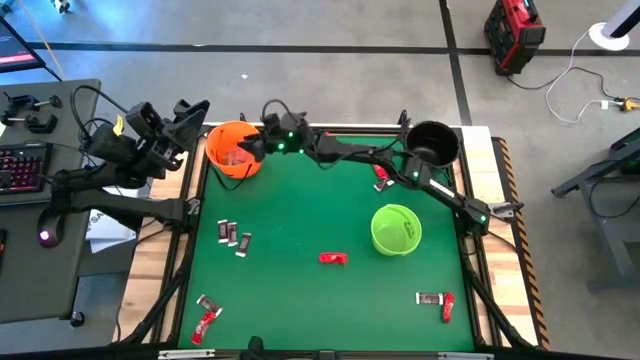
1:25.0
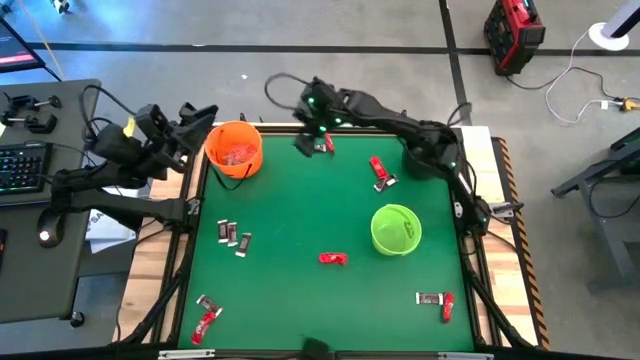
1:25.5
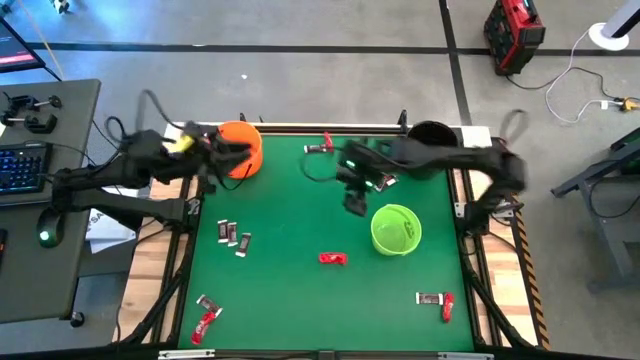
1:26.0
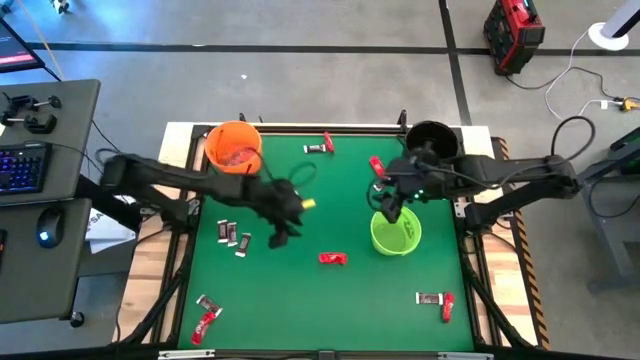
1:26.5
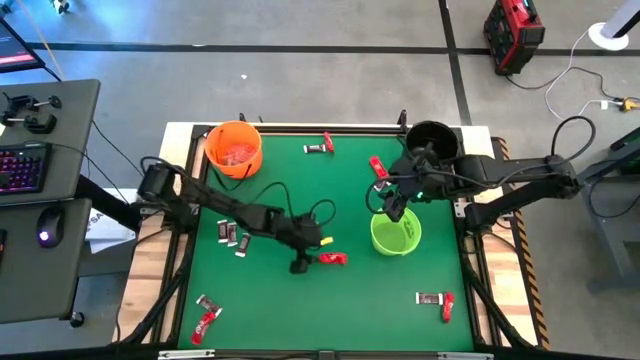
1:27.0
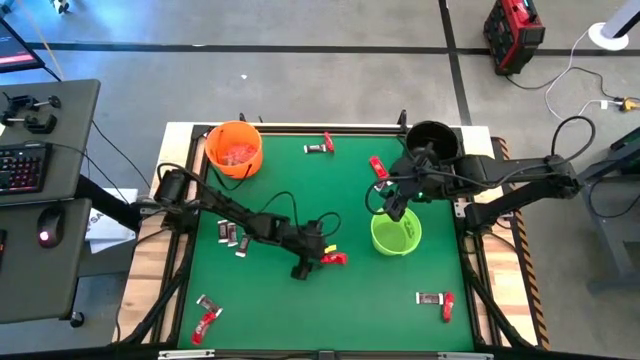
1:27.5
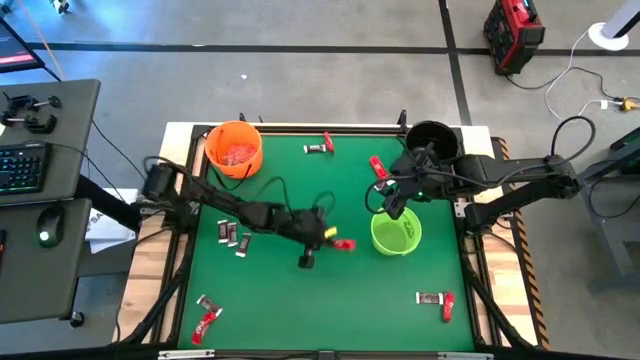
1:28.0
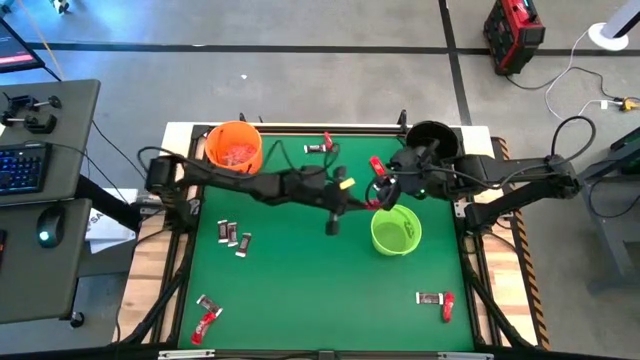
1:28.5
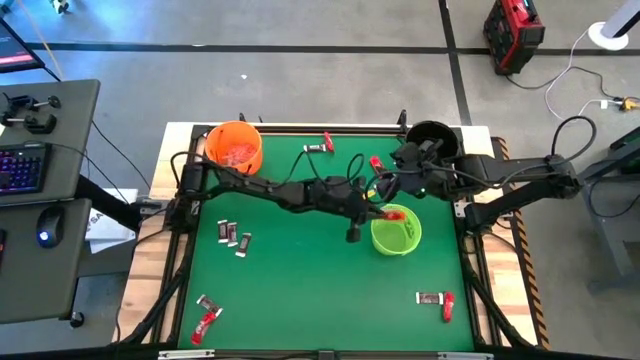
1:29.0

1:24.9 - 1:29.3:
Task: Sort candy by brand, put in halloween buckets
Put the red chocolate bar into the green bucket

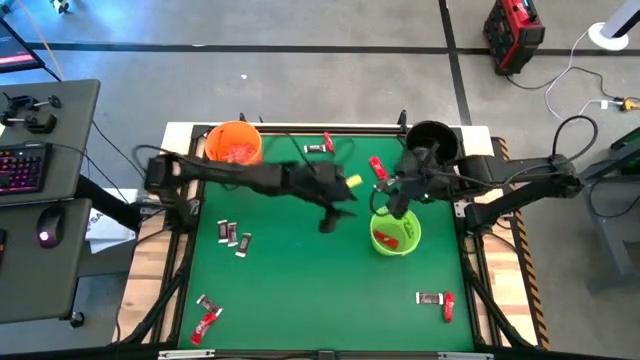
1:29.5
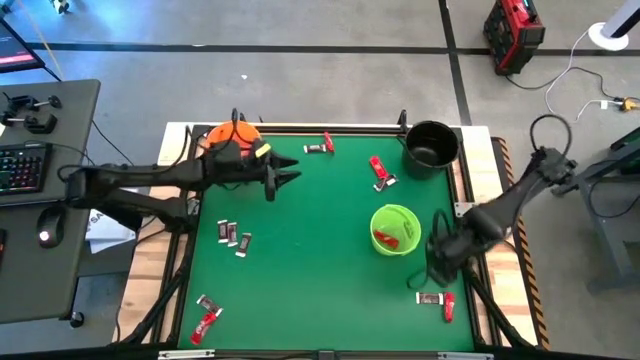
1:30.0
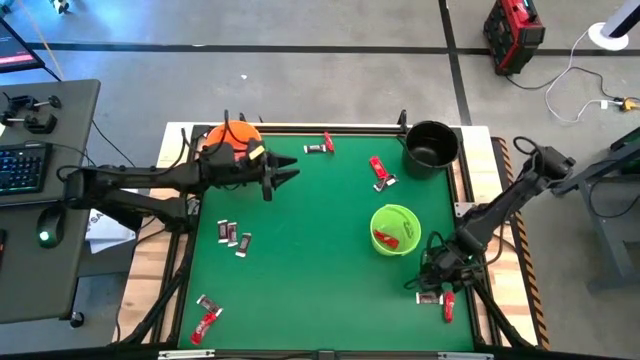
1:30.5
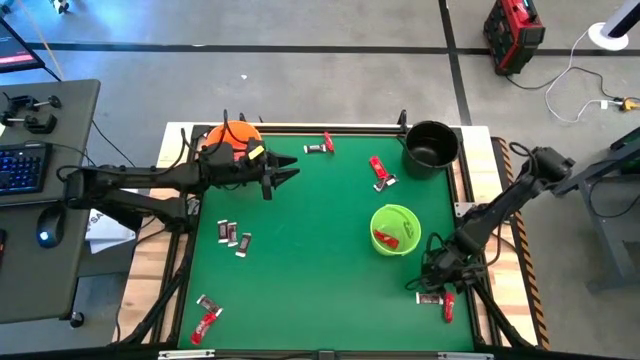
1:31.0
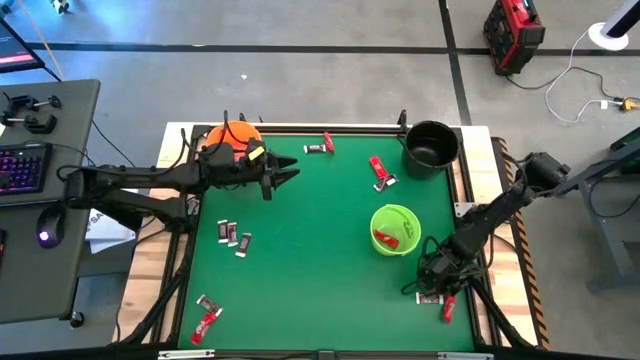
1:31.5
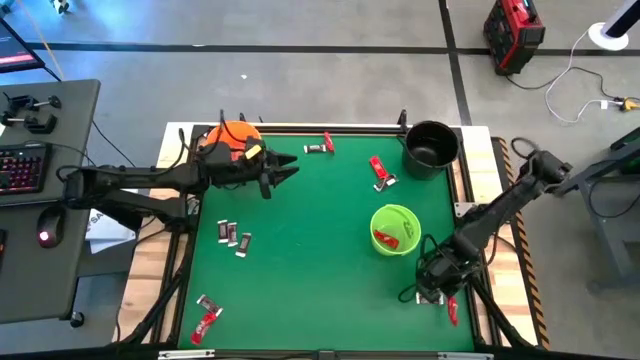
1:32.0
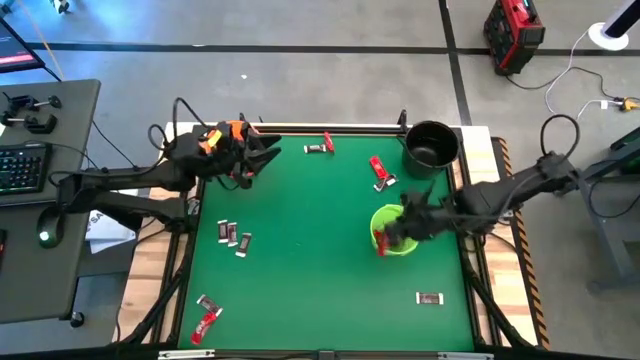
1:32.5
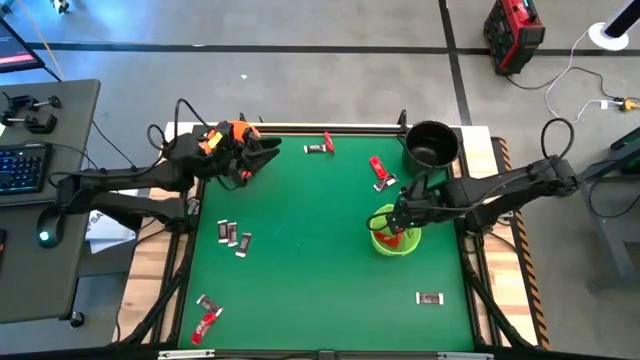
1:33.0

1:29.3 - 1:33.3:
Put the red chocolate bar into the green bucket

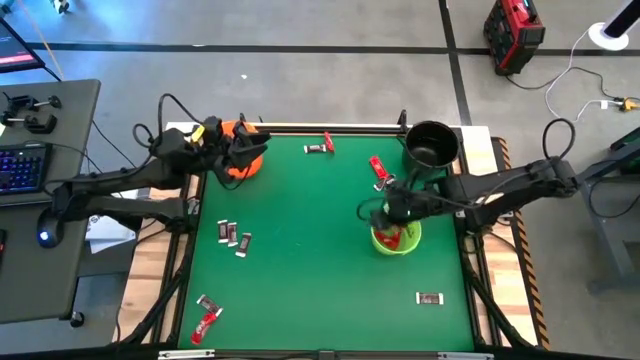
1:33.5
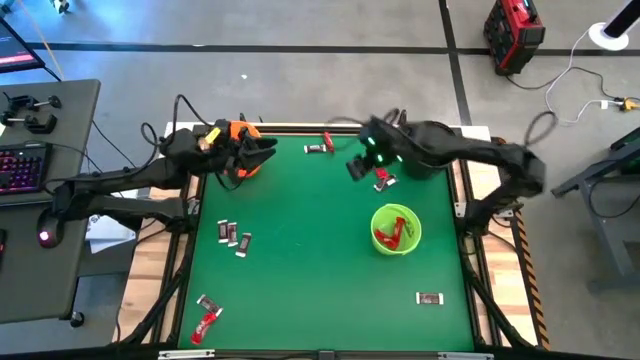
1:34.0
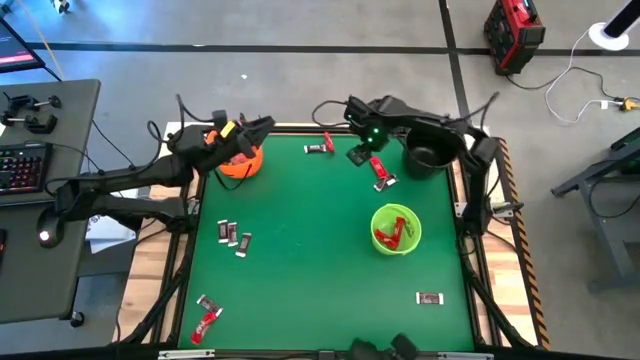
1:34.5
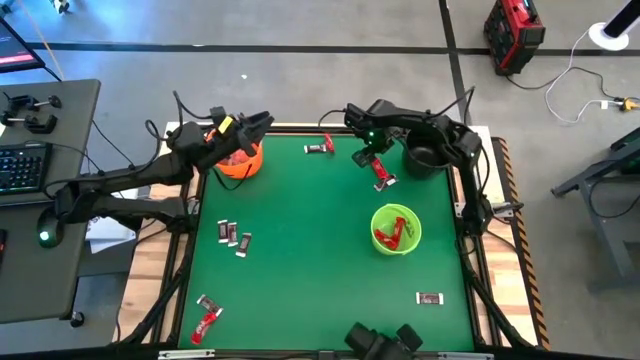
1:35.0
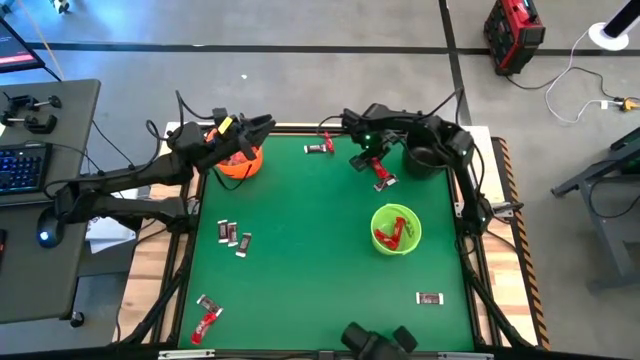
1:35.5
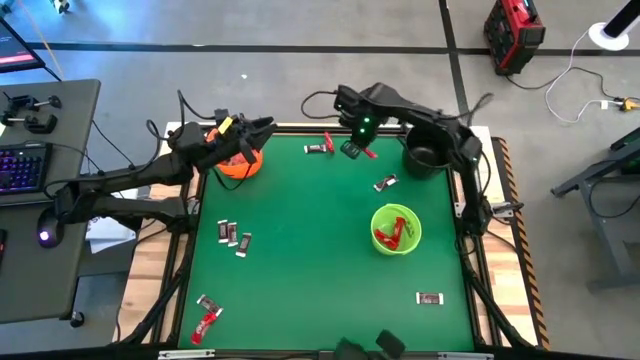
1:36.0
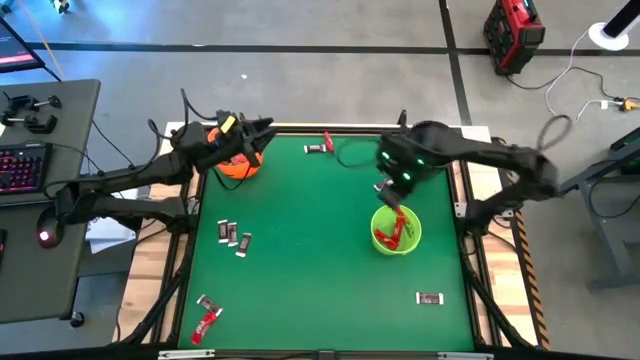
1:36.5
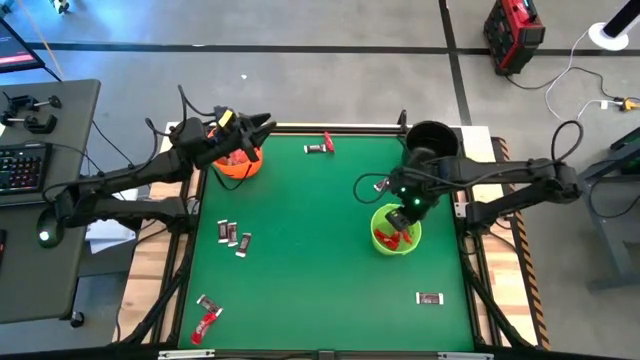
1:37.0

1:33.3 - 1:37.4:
Put the red chocolate bar into the green bucket

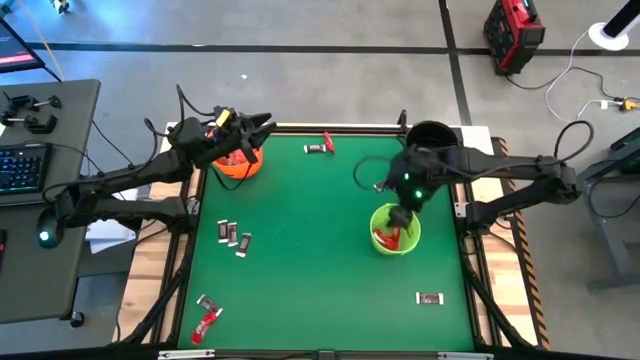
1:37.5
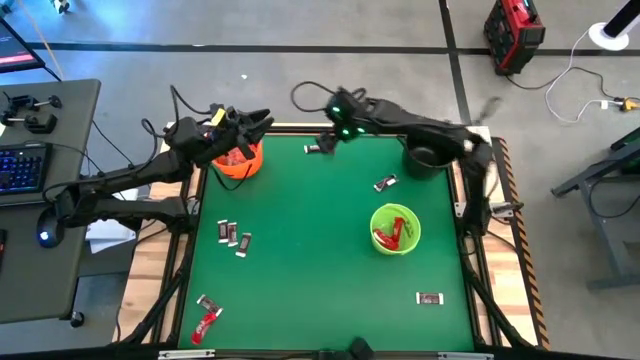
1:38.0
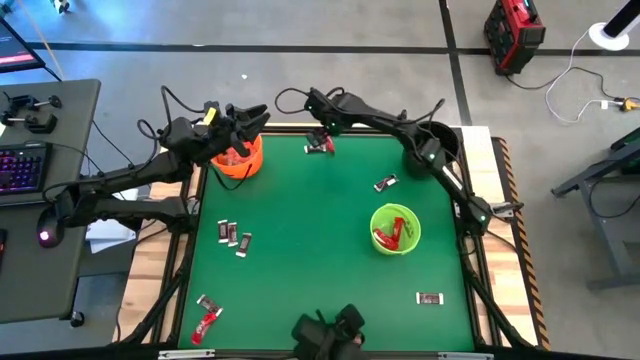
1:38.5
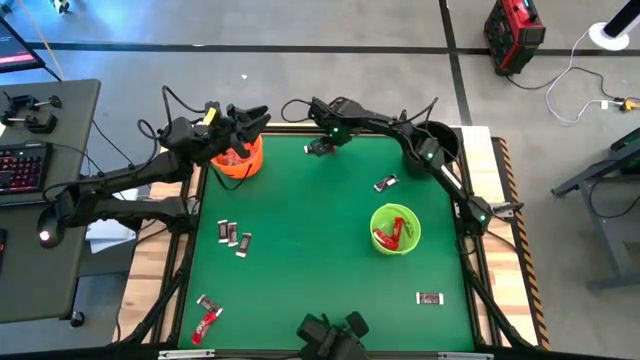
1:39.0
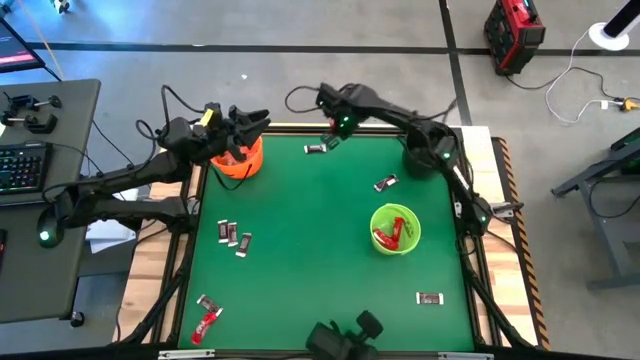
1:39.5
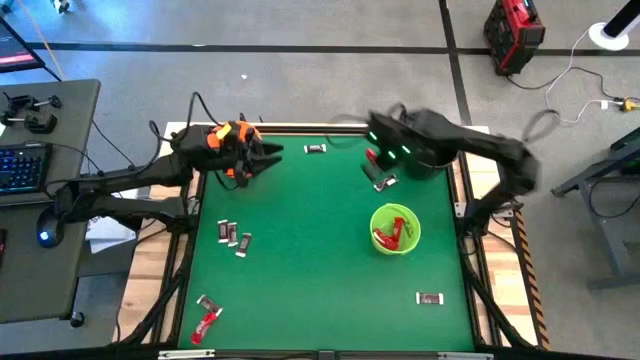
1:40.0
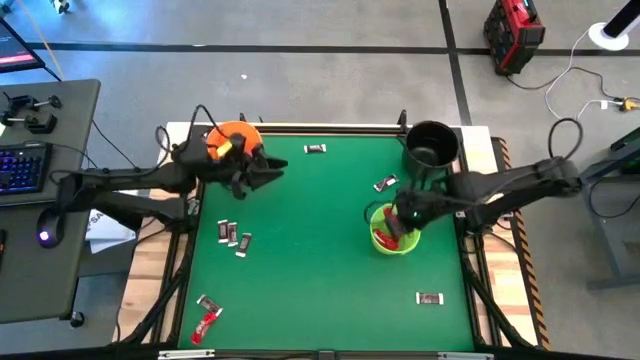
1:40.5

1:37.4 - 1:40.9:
Put the red chocolate bar into the green bucket

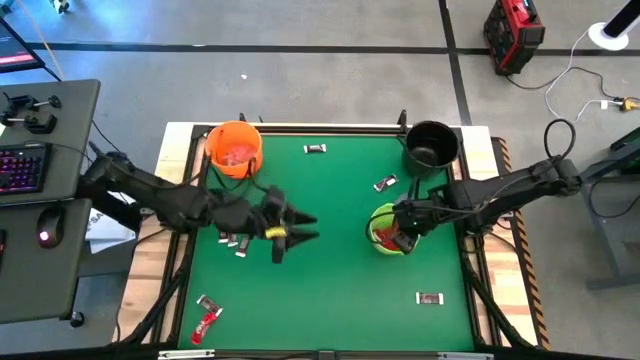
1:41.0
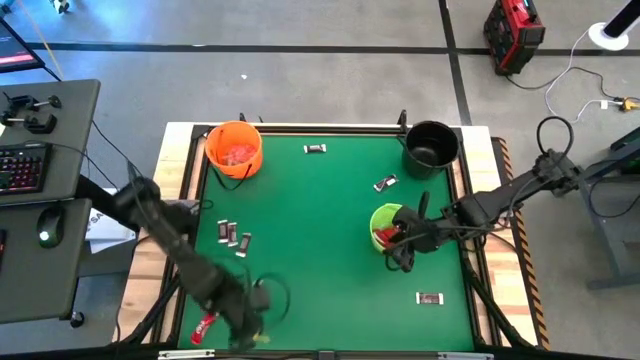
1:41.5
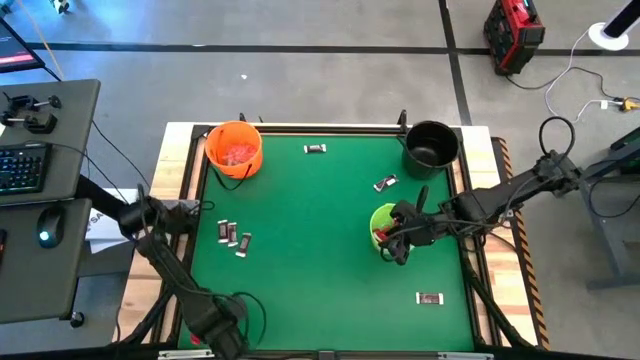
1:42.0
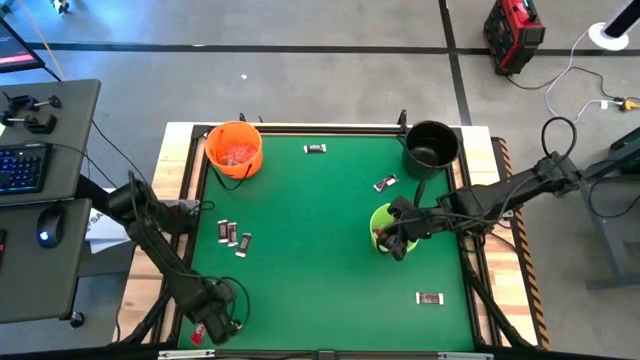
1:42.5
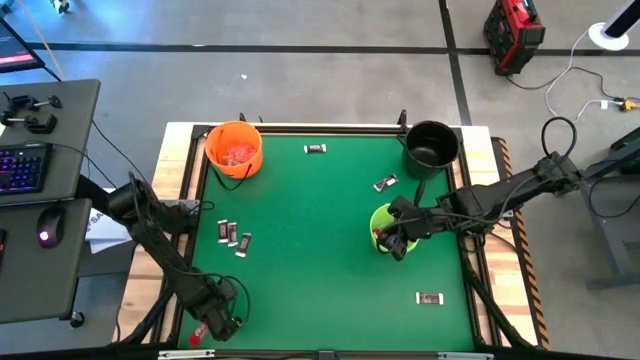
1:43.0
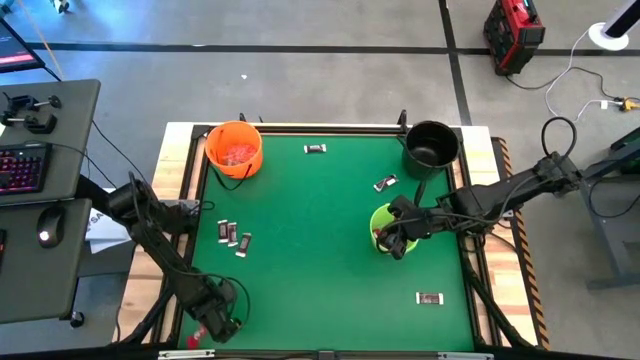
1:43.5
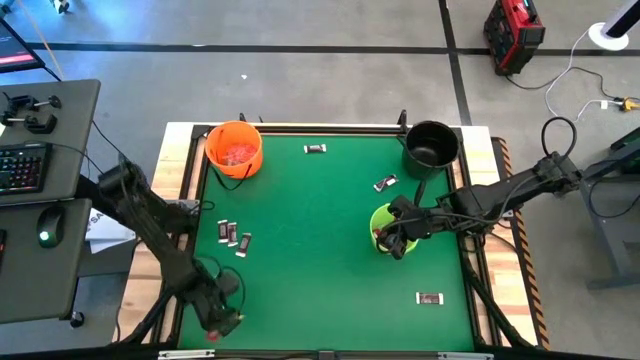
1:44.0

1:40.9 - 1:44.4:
Put the red chocolate bar into the green bucket

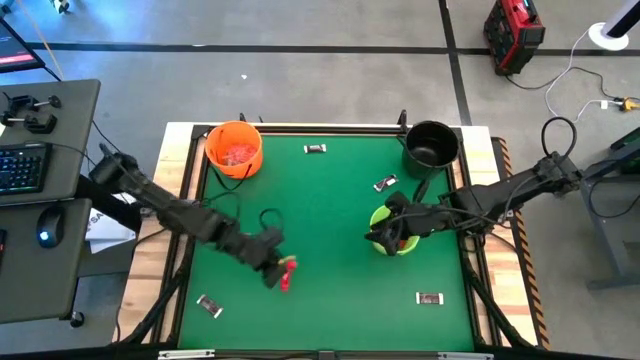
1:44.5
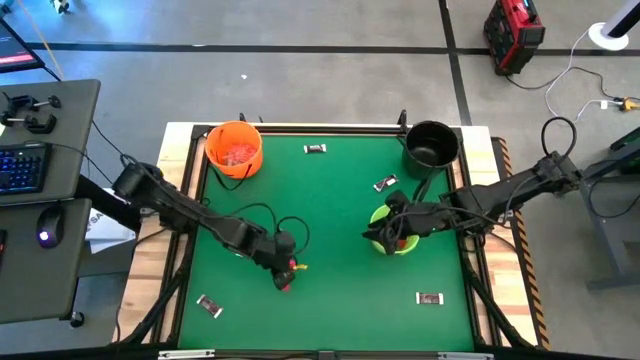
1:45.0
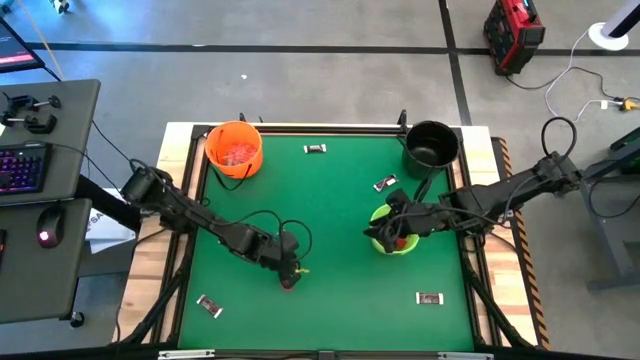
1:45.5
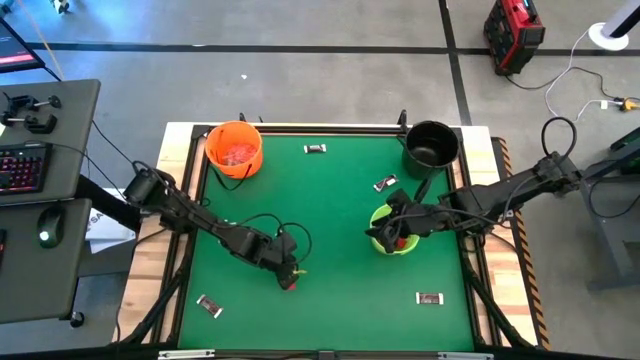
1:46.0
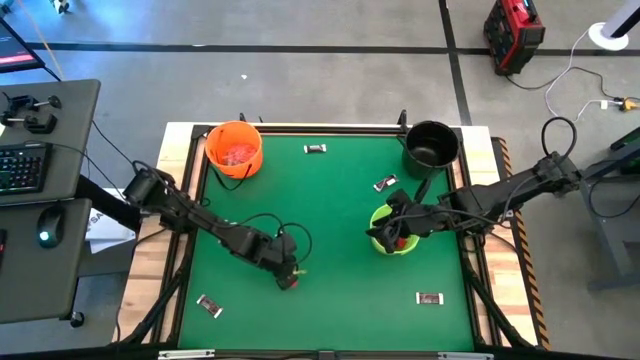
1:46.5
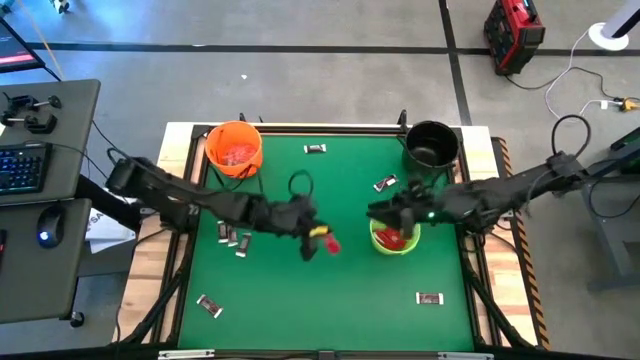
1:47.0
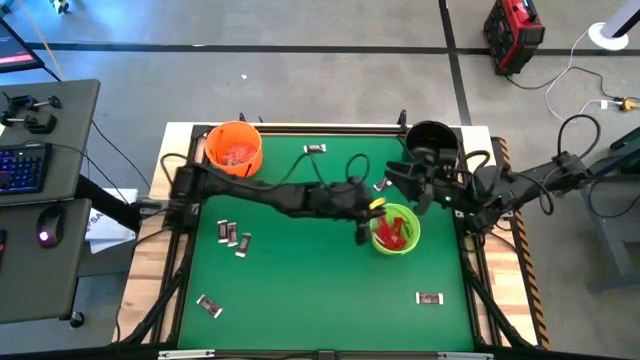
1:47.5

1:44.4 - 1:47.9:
Put the red chocolate bar into the green bucket
